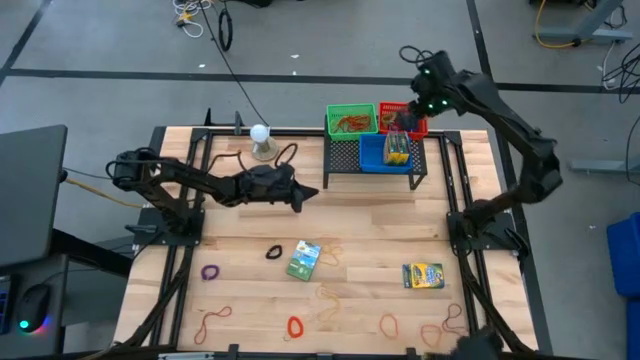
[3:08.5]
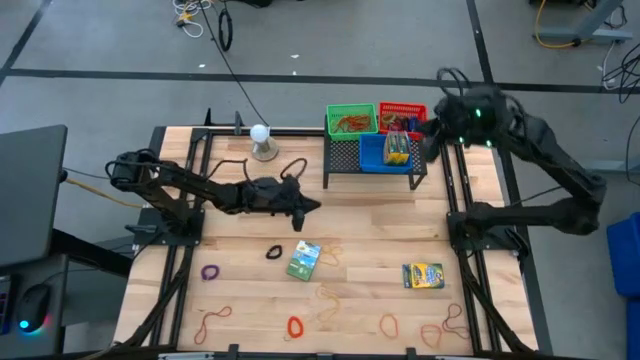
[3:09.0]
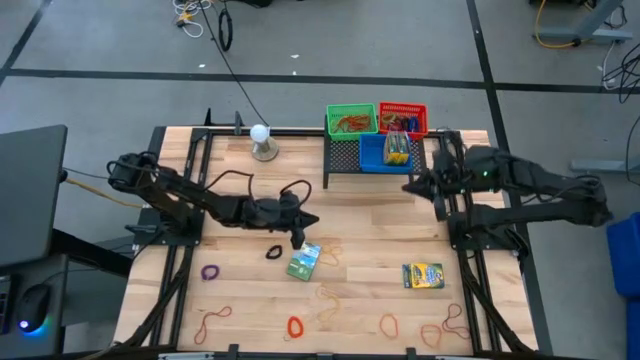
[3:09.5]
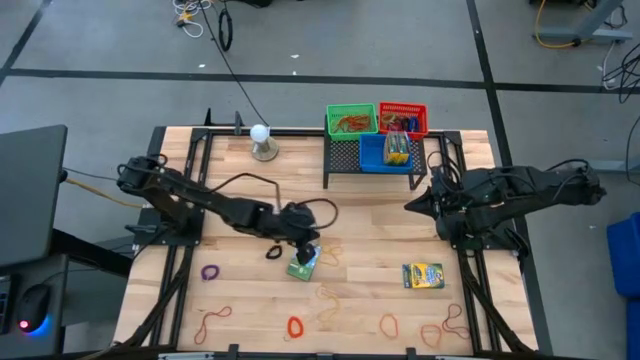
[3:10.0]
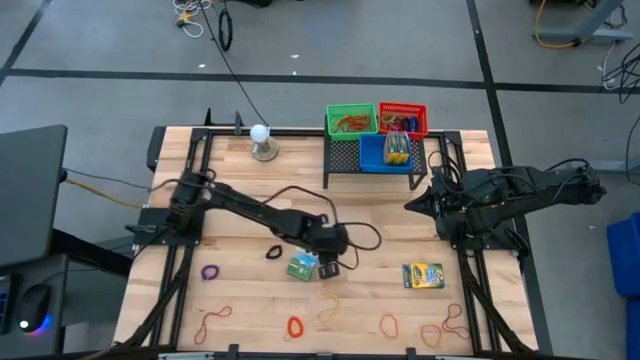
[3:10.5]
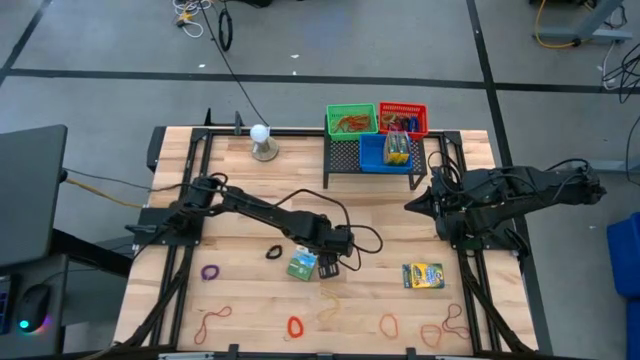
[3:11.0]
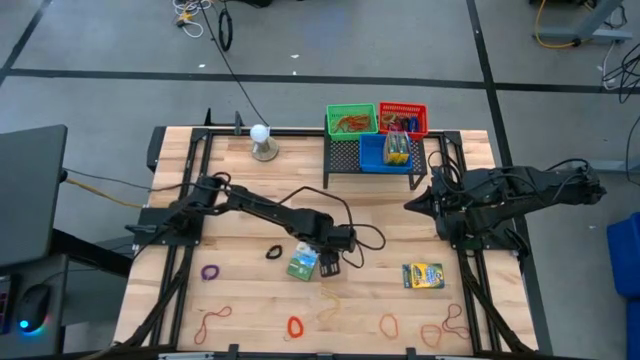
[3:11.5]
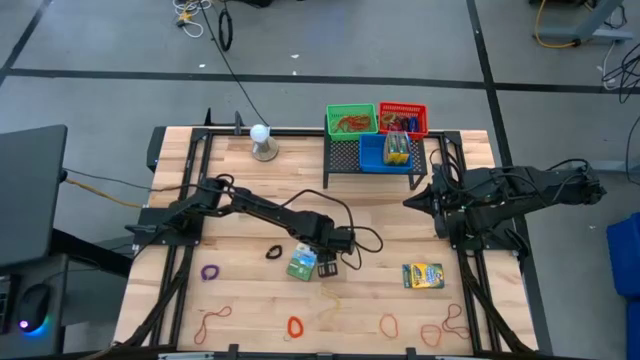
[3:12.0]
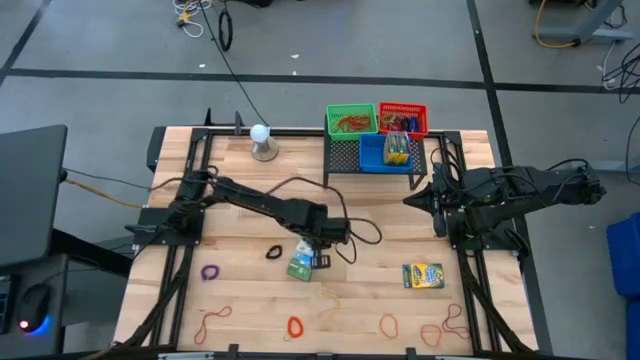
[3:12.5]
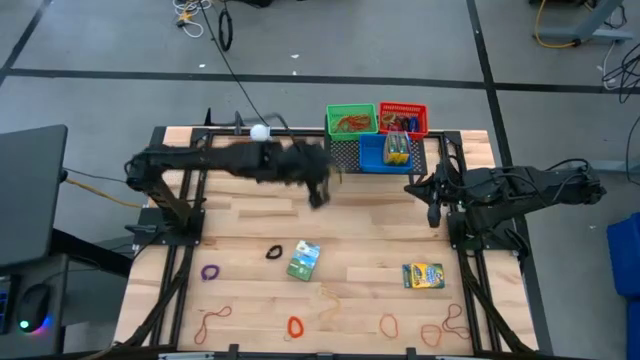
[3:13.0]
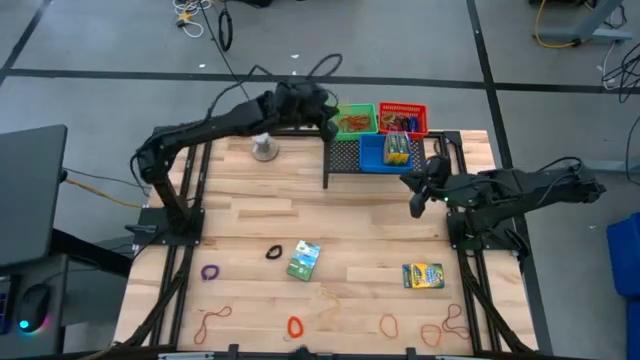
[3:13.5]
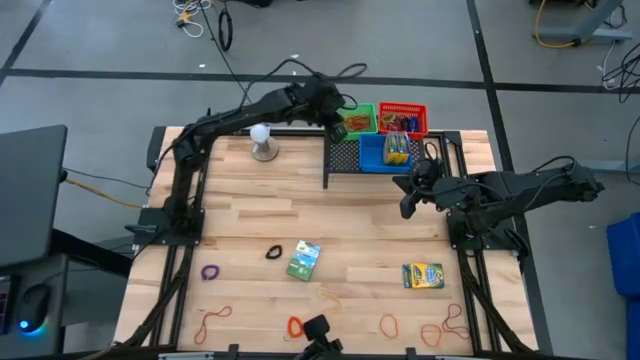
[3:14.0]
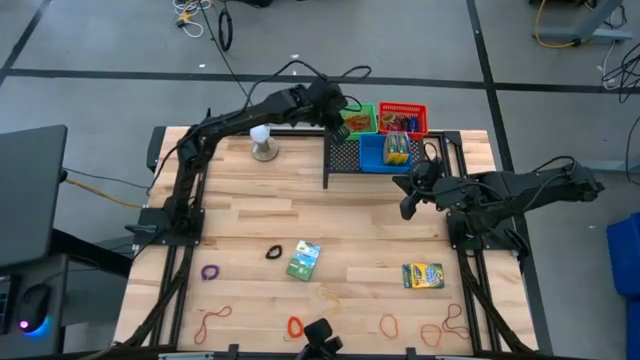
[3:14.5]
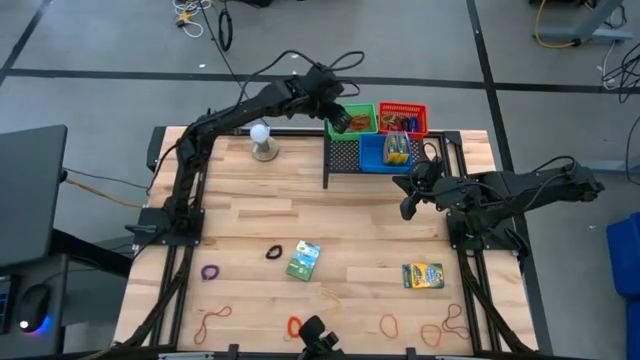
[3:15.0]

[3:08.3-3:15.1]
Task: Pick & Place Office Desk Supplies
Put the yellow rubber band into the green bin

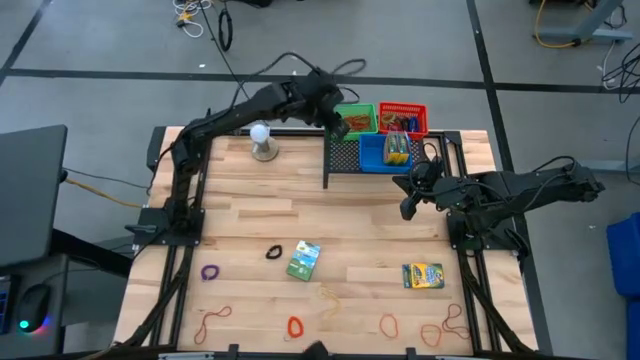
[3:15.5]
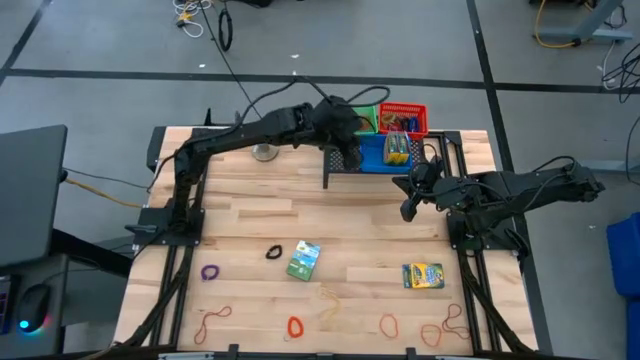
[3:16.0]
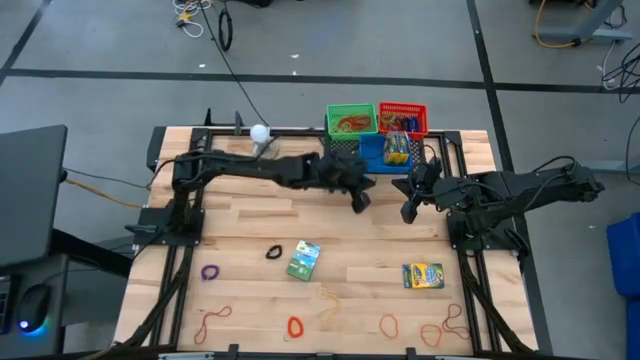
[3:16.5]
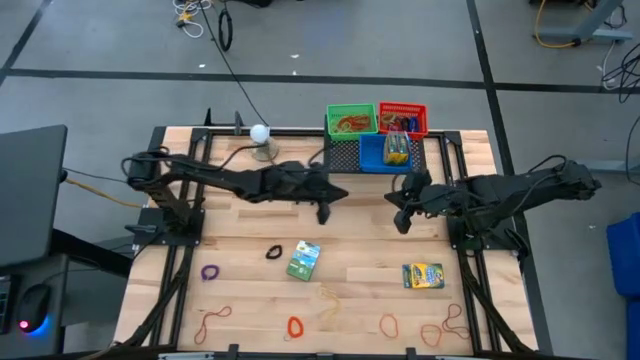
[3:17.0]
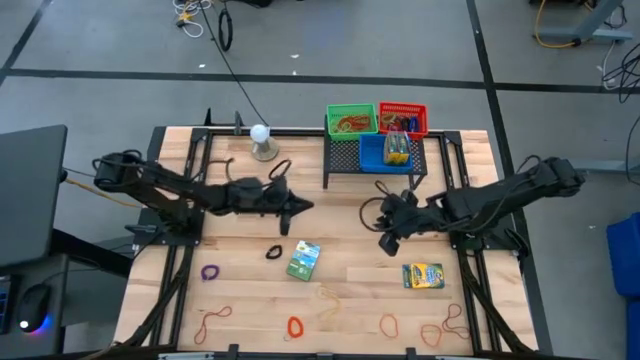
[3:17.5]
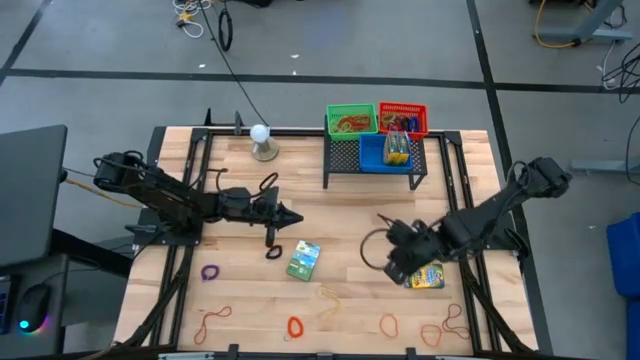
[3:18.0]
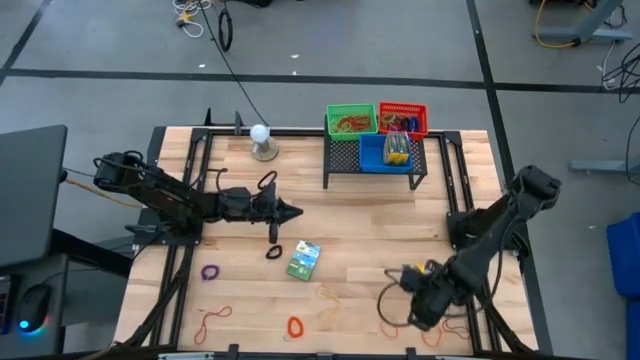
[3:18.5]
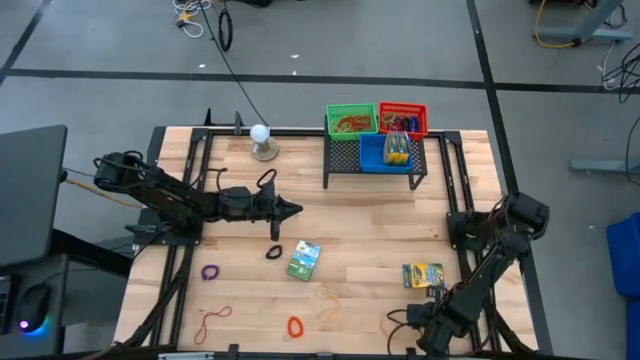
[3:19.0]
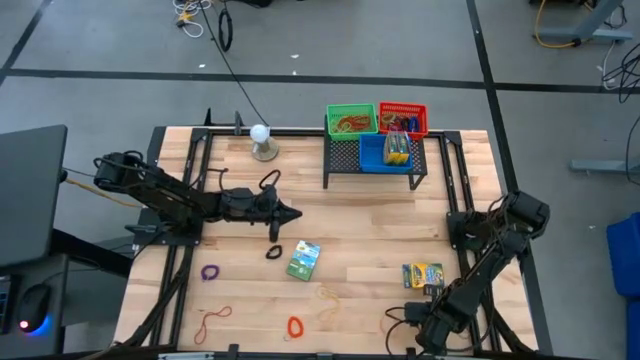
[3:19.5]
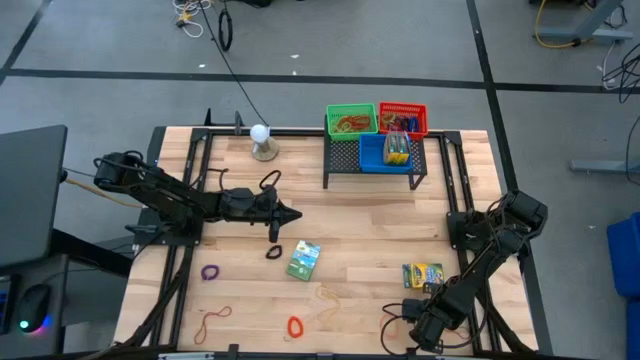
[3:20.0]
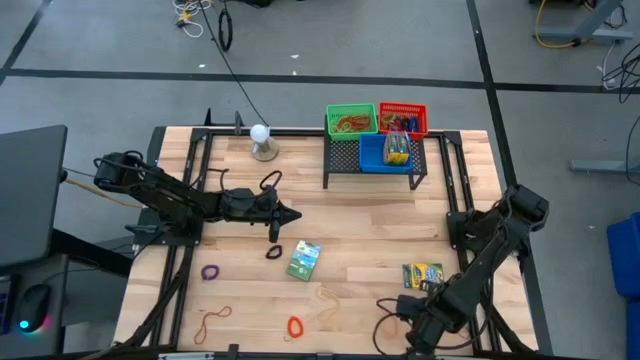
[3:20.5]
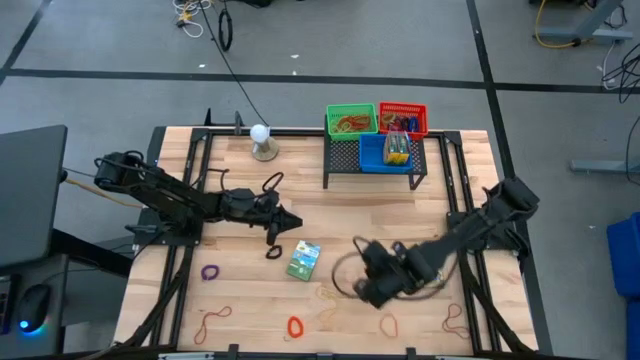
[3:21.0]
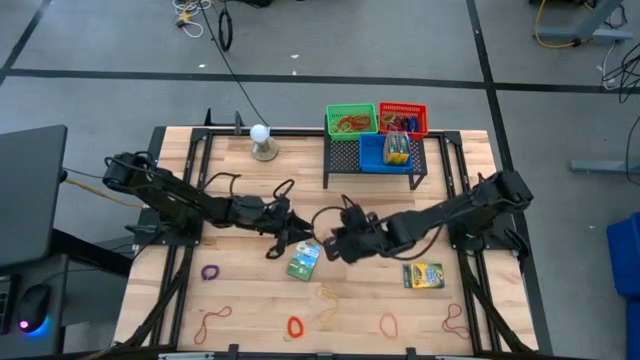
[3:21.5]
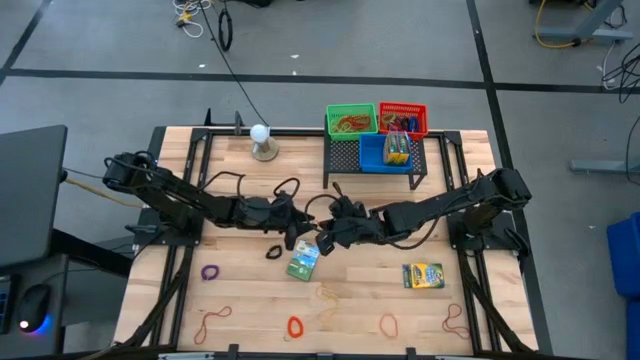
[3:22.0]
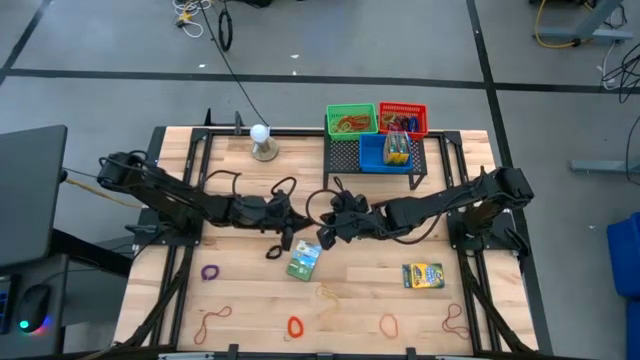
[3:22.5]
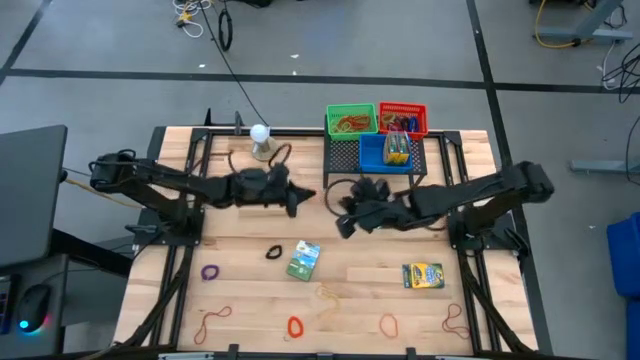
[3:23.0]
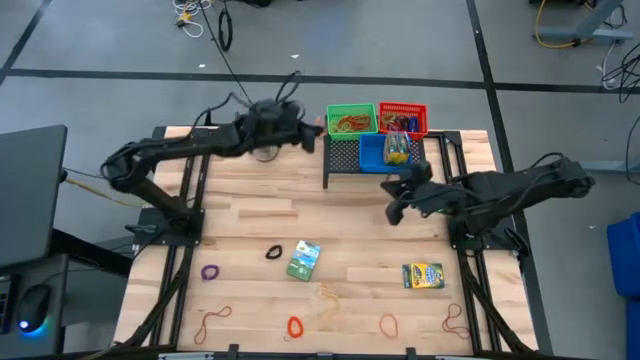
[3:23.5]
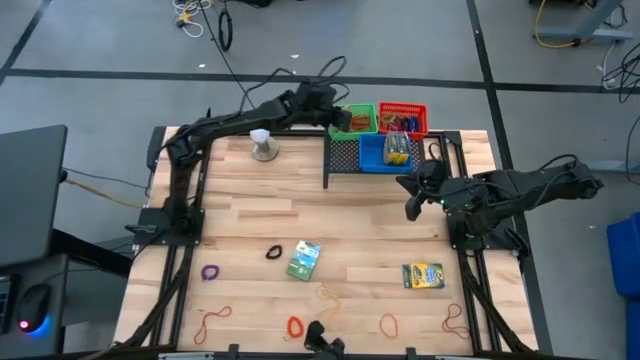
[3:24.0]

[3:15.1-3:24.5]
Put the orange rubber band into the green bin

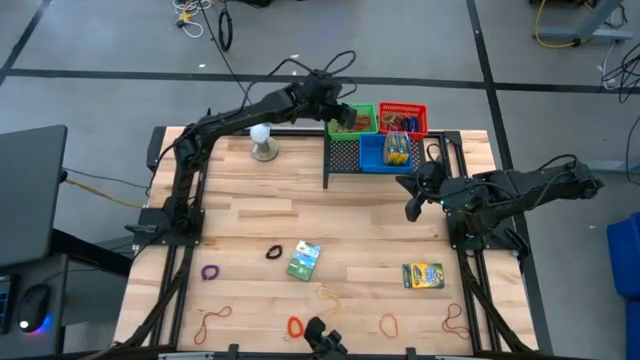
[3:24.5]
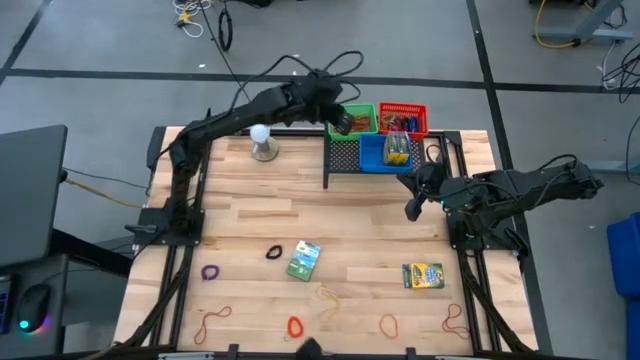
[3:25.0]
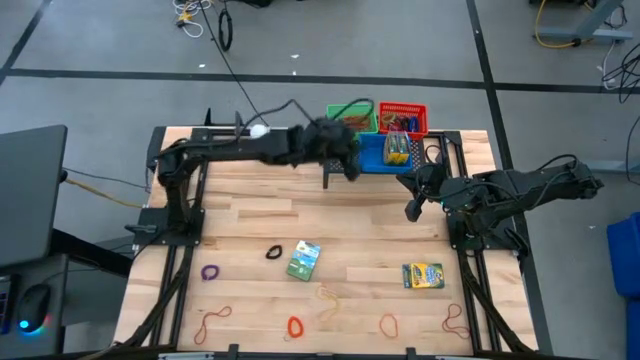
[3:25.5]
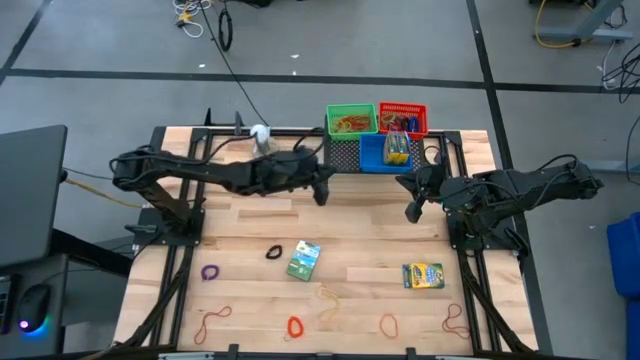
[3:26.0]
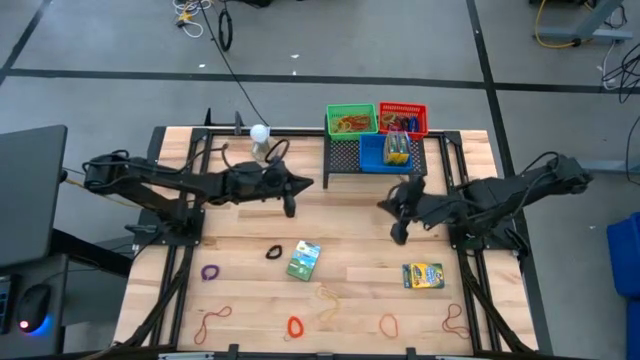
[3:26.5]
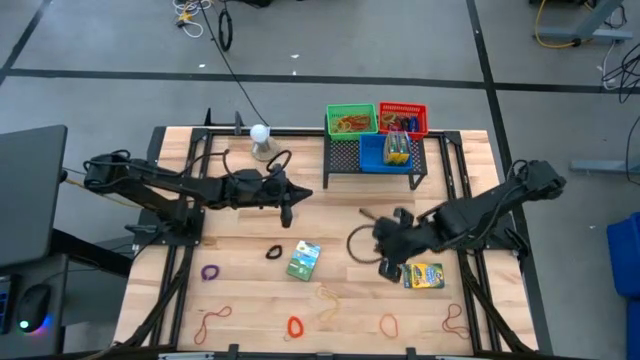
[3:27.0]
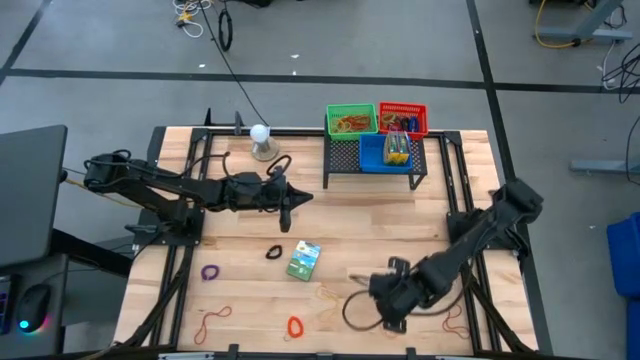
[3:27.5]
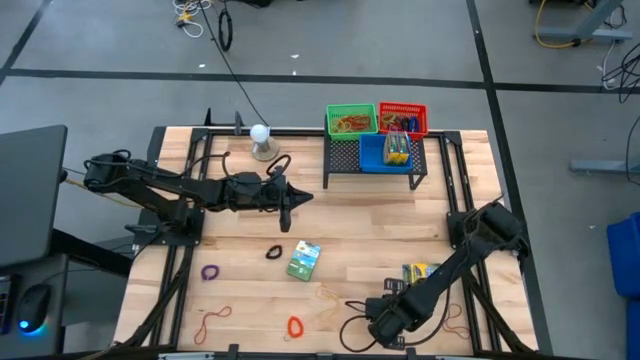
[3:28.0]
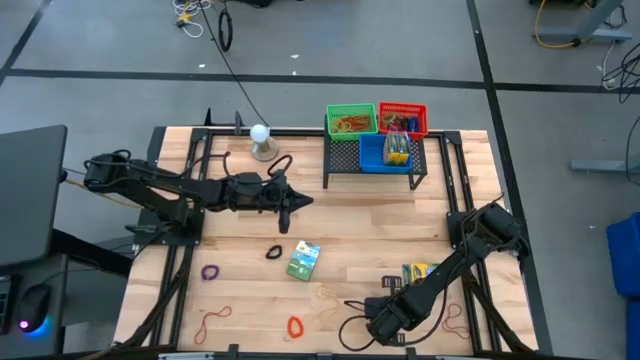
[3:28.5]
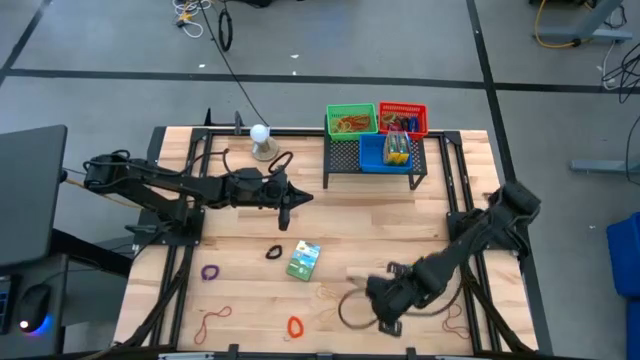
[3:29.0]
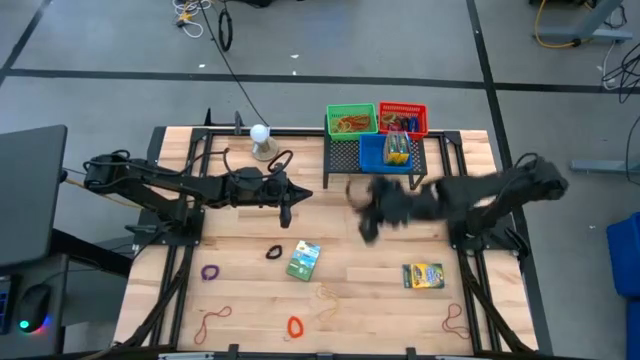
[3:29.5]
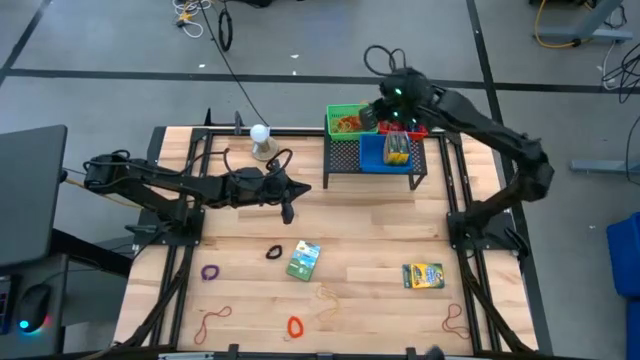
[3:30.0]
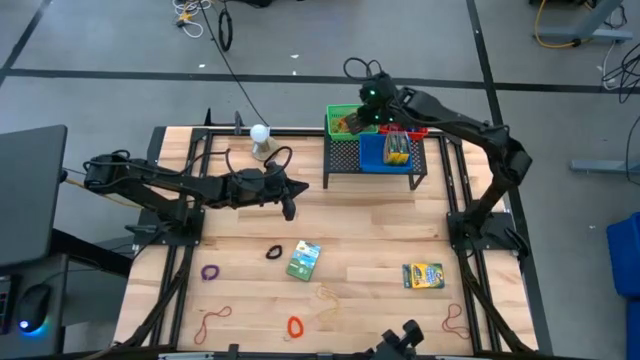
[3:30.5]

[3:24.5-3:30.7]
Put the orange rubber band into the green bin
